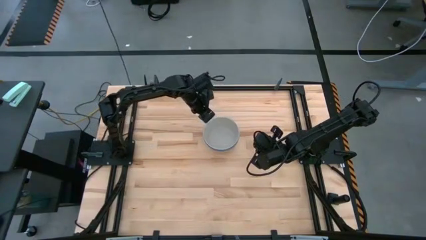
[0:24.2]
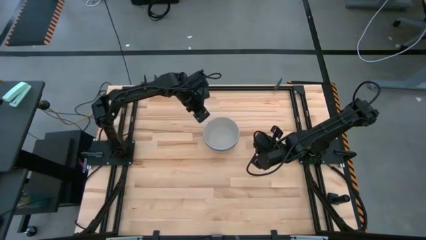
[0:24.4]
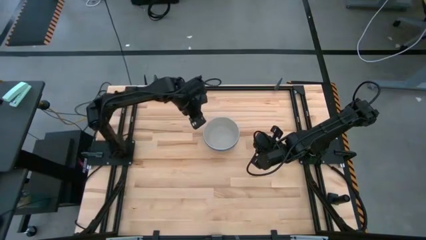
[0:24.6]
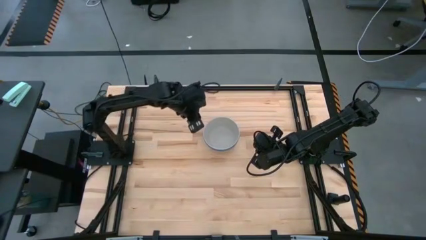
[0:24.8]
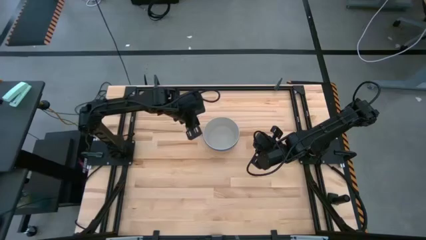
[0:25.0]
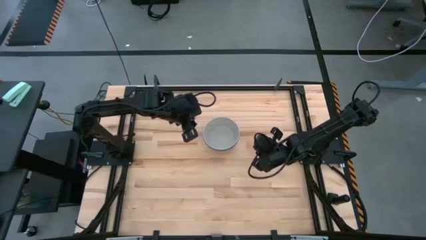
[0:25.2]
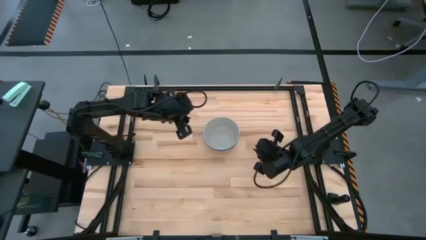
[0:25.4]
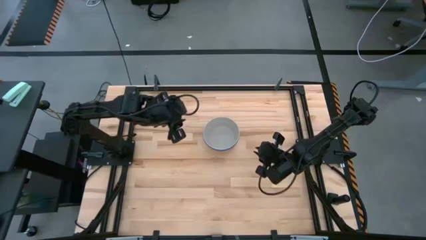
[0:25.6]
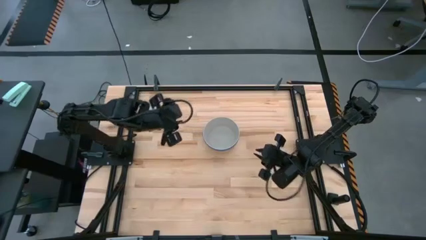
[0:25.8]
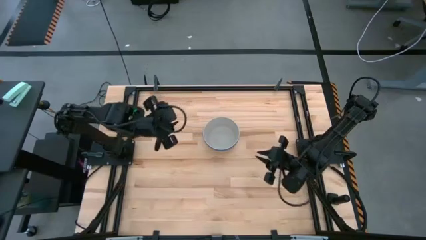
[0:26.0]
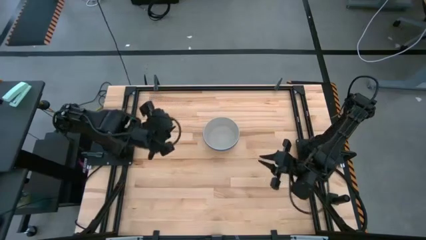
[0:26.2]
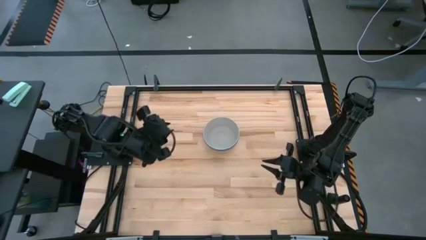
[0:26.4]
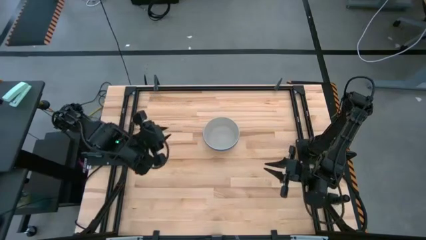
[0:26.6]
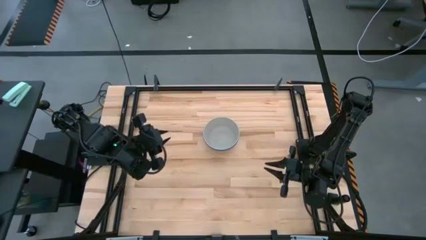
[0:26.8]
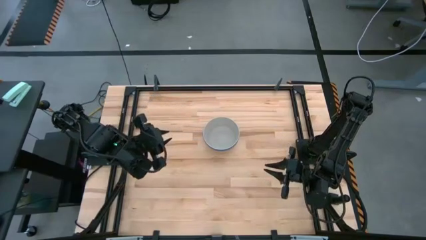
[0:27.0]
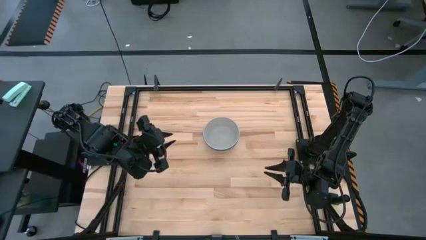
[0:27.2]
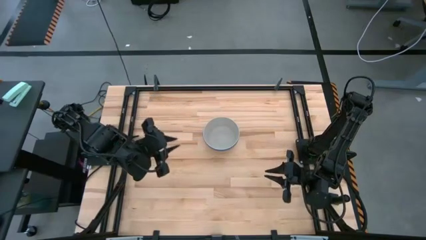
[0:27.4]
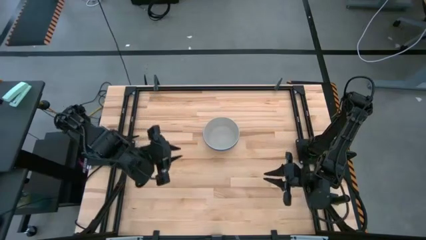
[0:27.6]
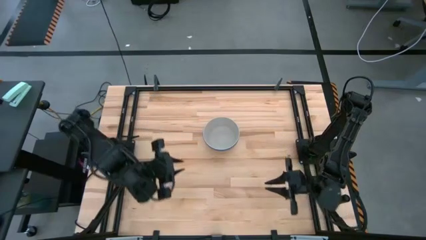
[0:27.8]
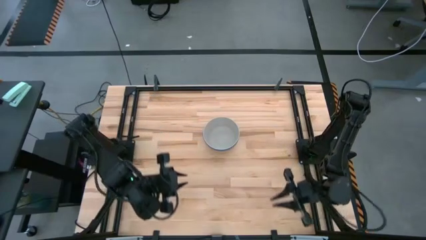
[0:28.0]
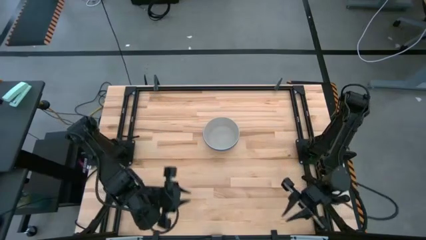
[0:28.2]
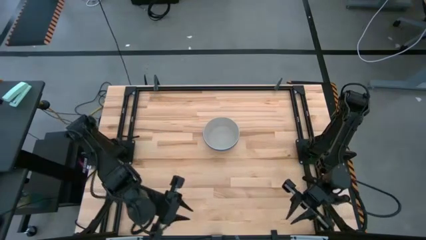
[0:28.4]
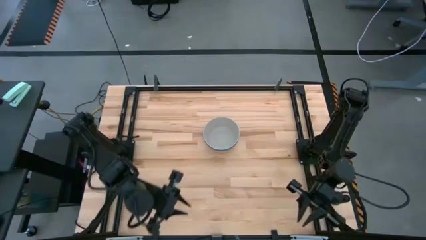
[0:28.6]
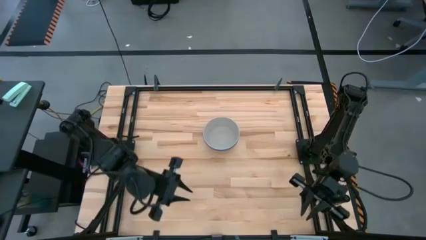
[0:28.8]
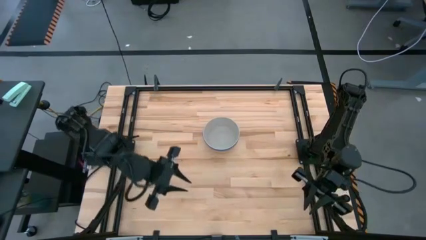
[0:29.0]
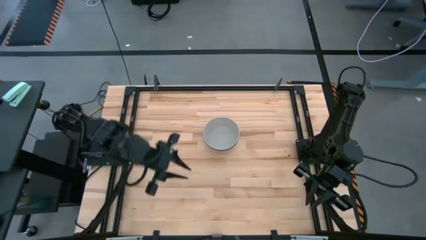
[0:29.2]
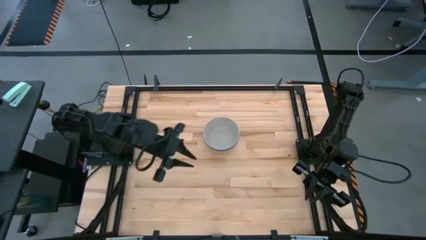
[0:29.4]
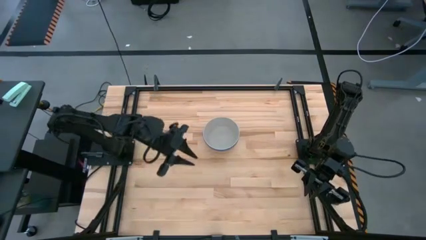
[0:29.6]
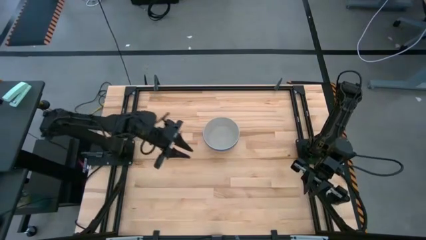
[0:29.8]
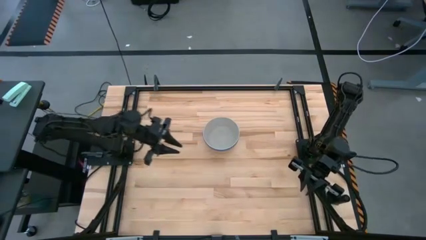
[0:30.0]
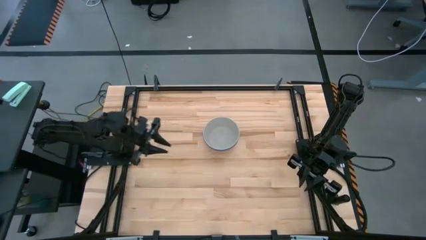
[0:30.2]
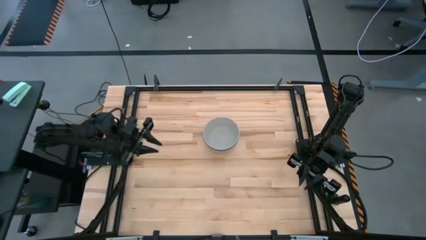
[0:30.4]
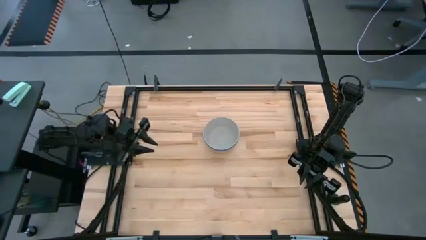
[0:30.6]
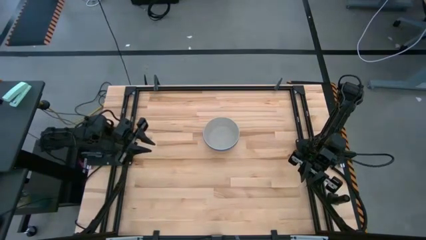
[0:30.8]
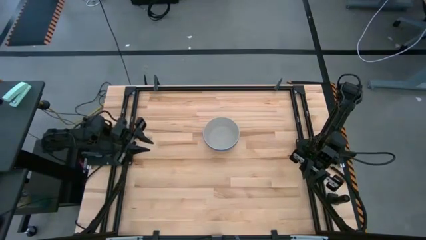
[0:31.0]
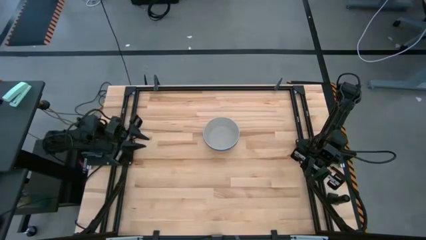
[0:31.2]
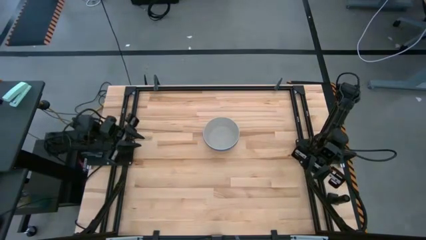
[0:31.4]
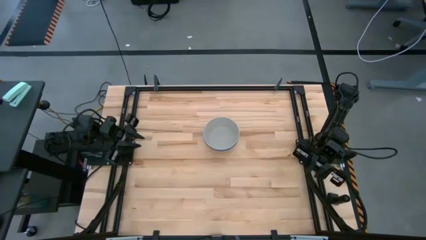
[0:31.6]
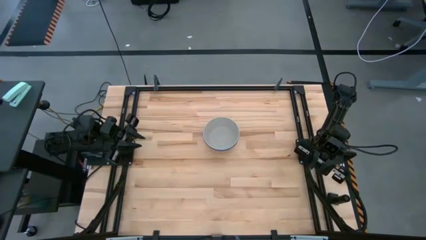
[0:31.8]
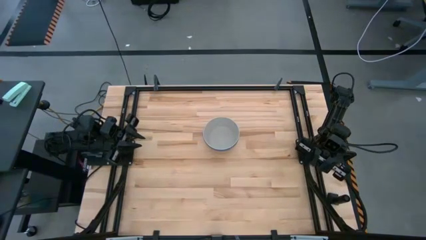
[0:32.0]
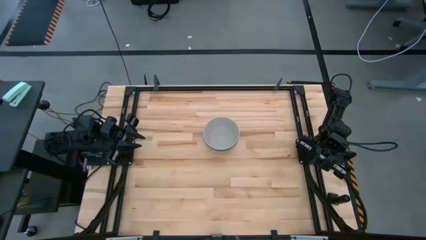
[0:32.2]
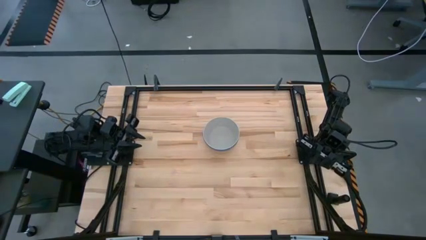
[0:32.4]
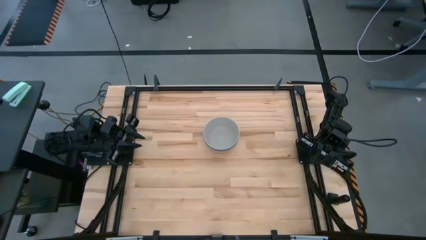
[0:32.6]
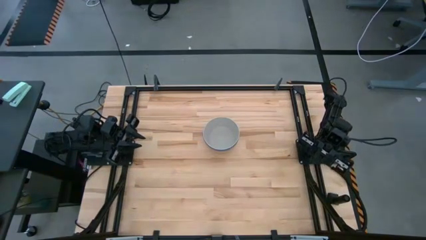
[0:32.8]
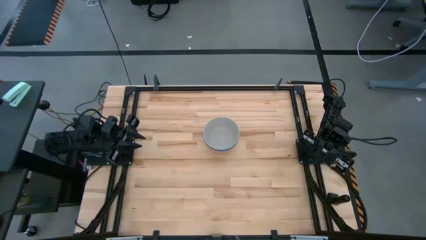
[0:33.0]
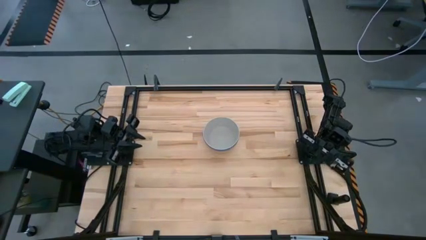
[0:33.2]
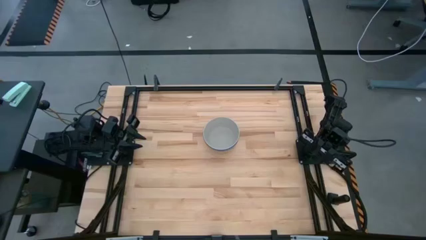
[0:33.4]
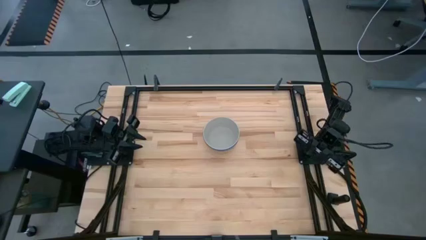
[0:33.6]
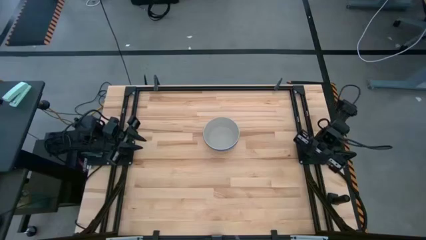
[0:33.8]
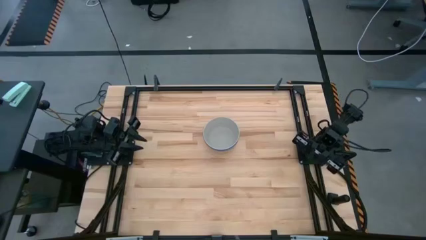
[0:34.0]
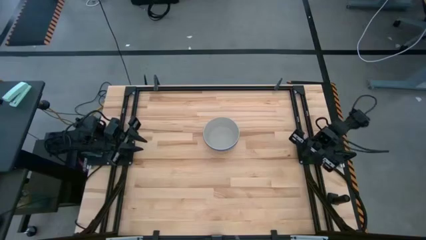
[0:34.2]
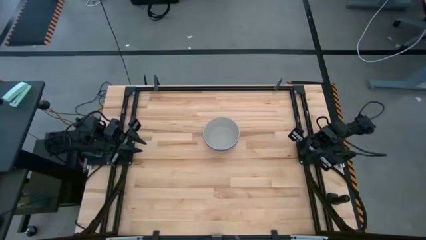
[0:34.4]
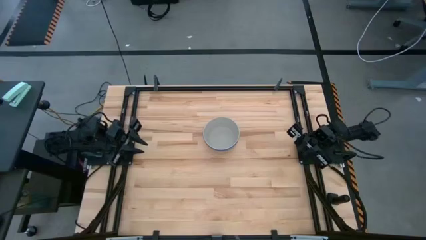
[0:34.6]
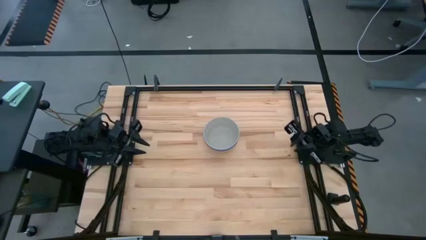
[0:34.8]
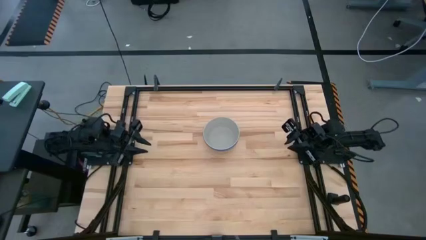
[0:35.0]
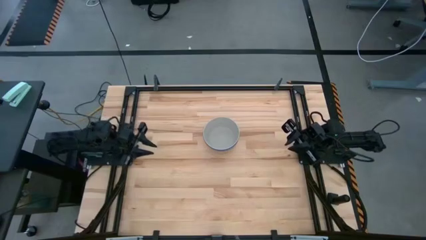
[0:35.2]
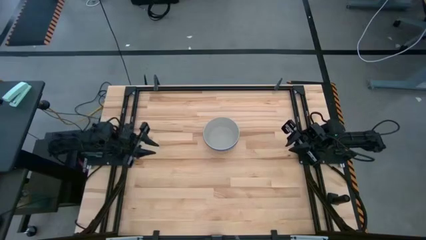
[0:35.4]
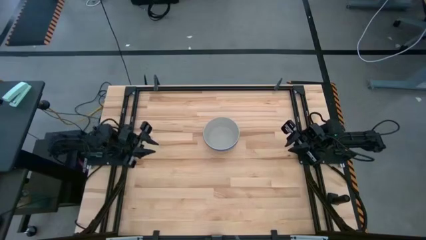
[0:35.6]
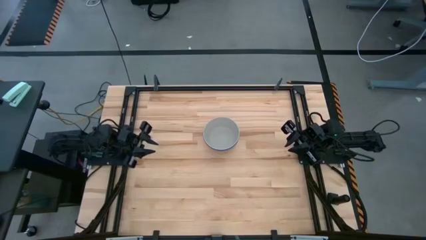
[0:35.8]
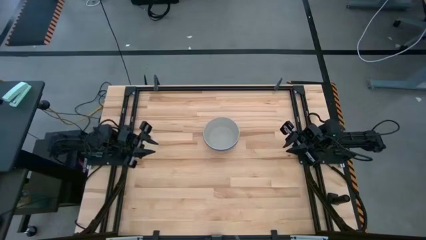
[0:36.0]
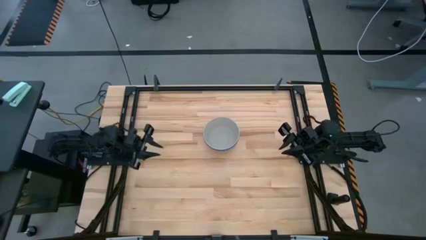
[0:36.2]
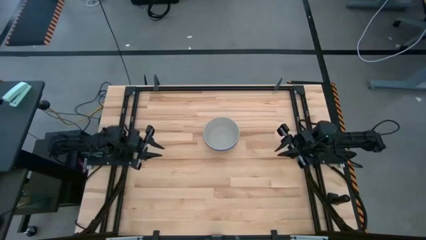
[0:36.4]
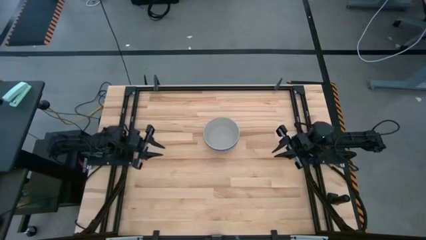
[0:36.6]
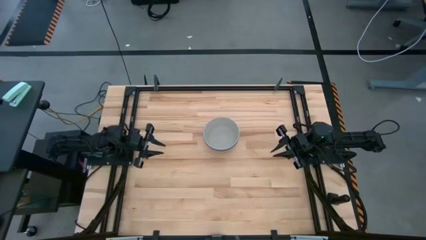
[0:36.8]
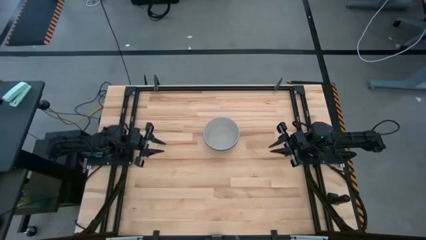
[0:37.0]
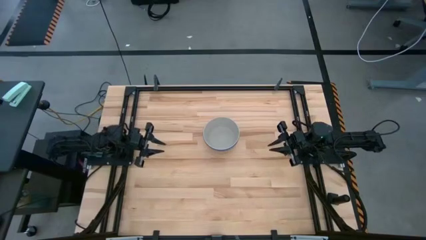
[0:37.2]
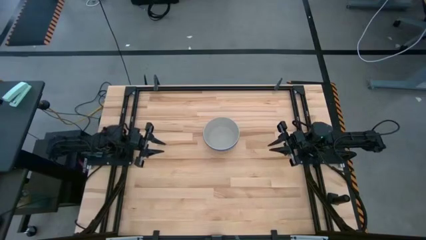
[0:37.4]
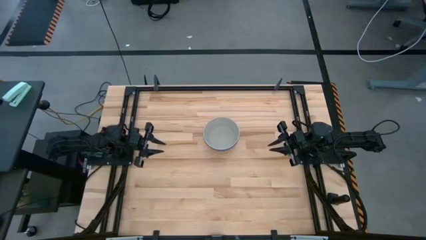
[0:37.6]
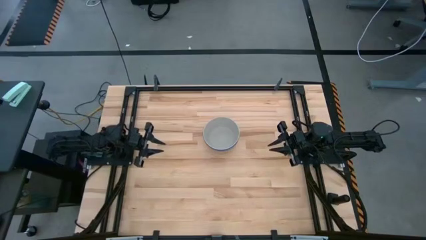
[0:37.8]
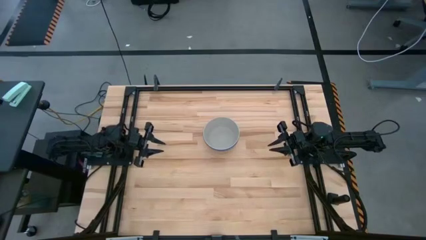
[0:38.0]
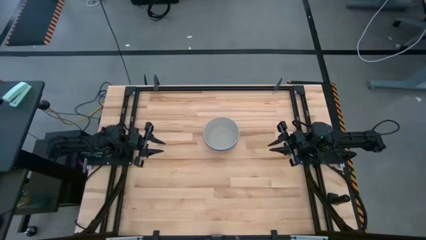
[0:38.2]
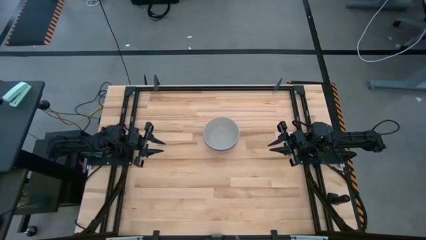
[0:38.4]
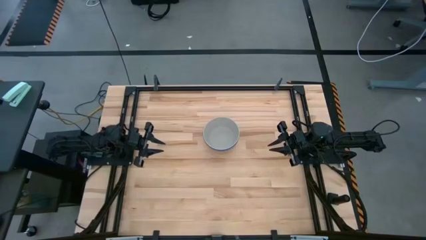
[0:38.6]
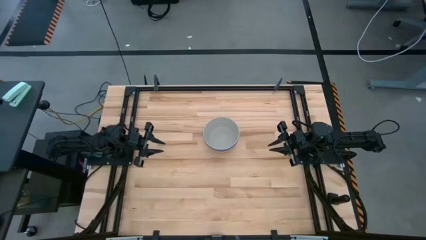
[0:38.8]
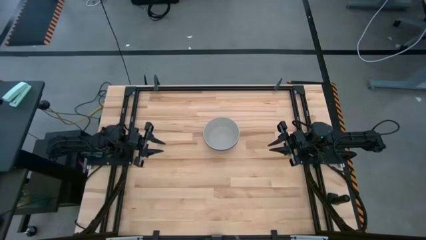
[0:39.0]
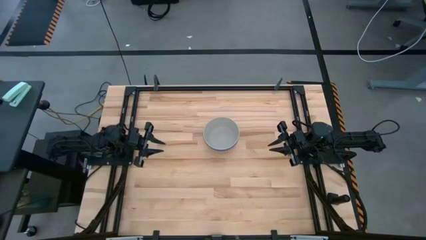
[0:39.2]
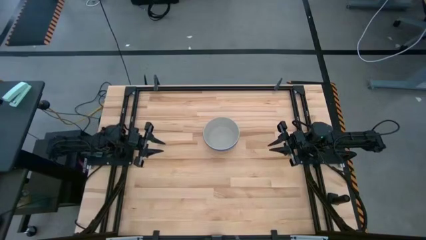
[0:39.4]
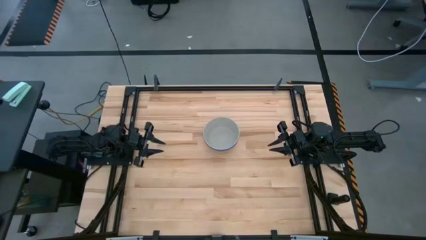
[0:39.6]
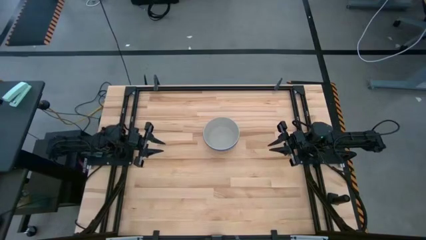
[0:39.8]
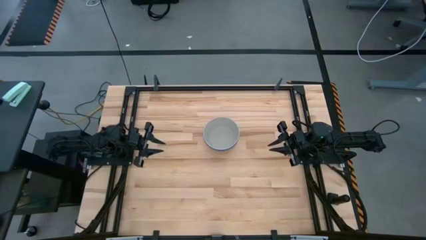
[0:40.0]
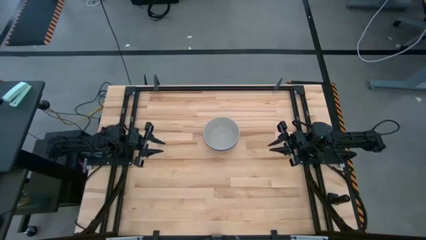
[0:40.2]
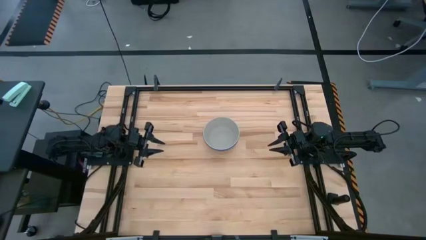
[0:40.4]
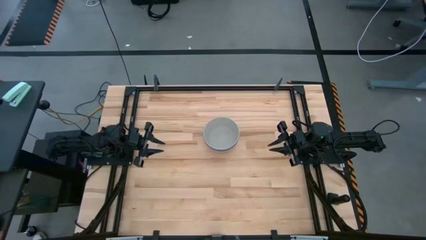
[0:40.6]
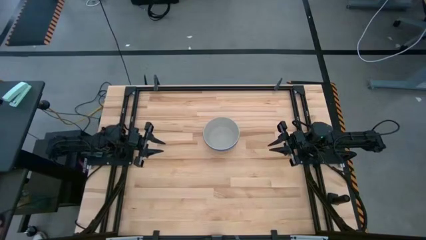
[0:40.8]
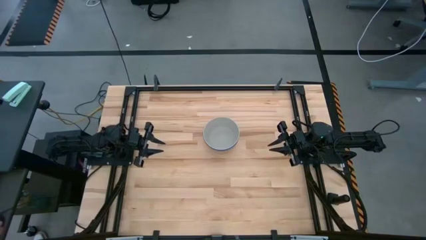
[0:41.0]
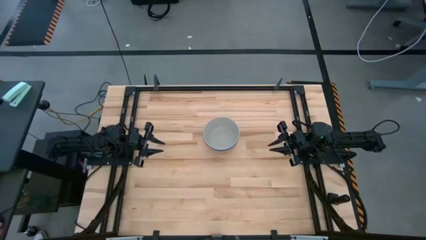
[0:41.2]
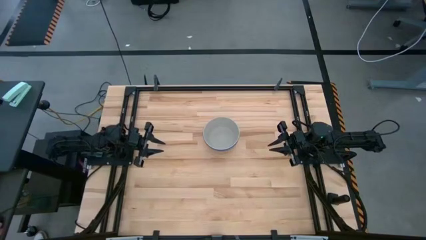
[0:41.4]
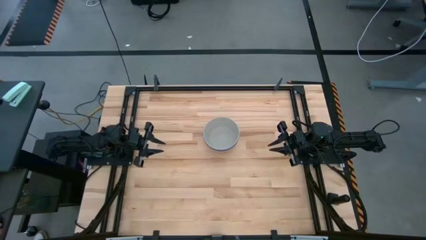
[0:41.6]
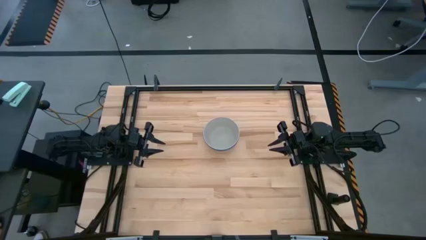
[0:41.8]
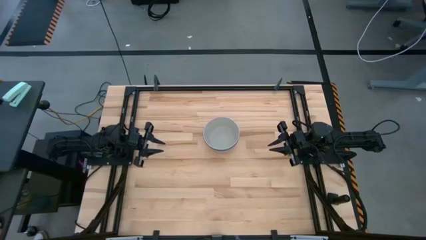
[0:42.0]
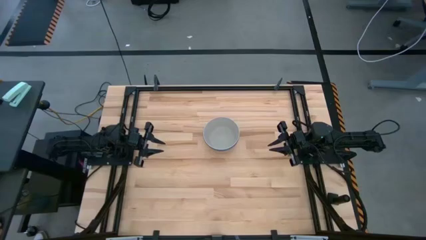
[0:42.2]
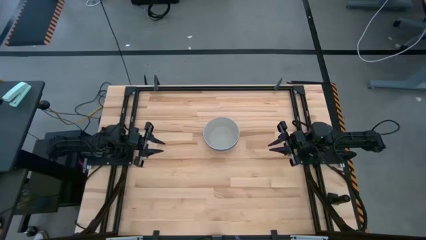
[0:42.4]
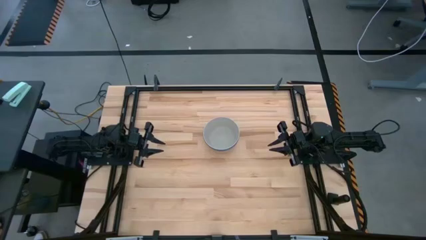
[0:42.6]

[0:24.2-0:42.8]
Task: Nest bowls inside each other
Return to Home Position
